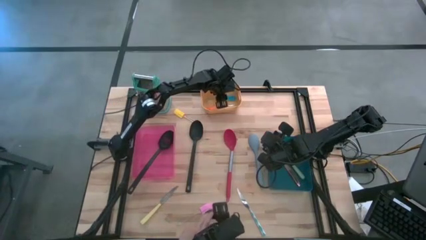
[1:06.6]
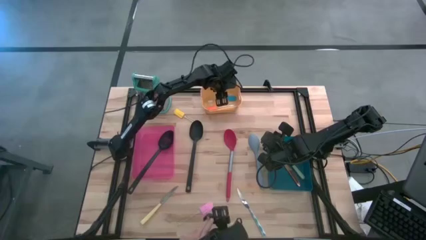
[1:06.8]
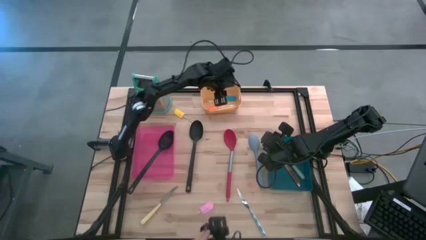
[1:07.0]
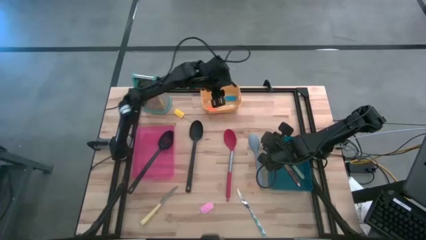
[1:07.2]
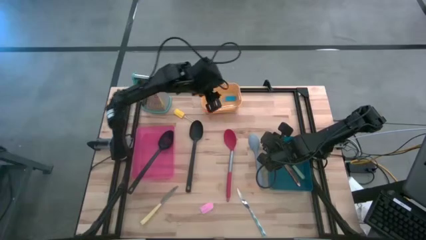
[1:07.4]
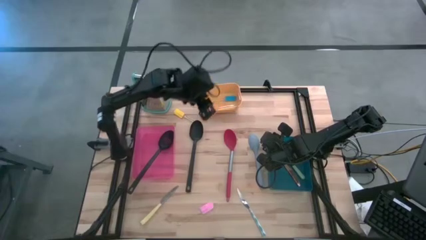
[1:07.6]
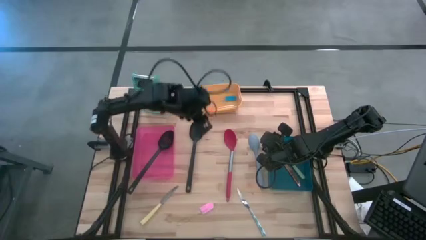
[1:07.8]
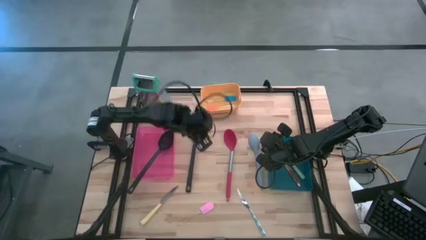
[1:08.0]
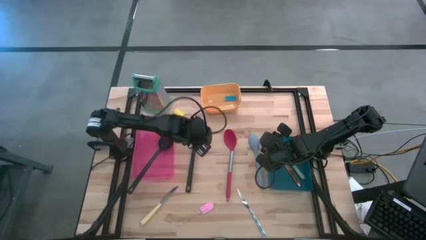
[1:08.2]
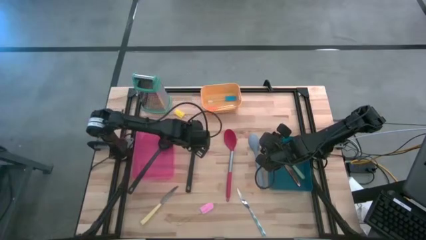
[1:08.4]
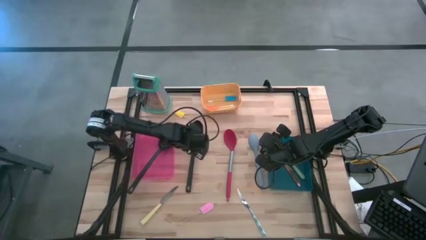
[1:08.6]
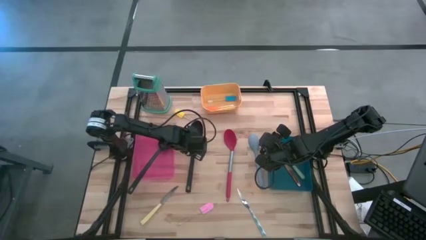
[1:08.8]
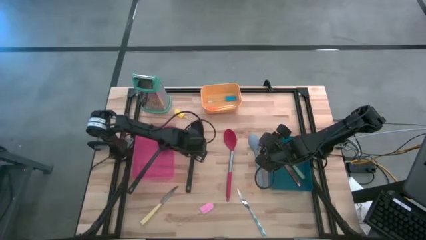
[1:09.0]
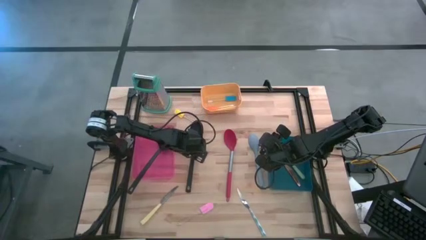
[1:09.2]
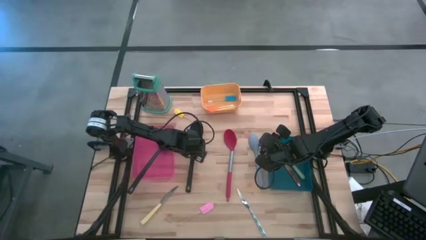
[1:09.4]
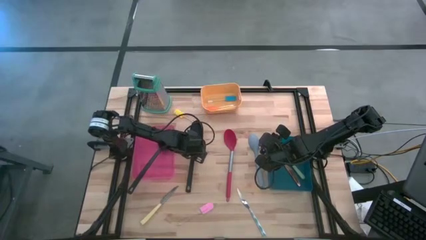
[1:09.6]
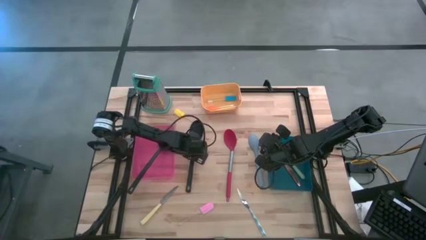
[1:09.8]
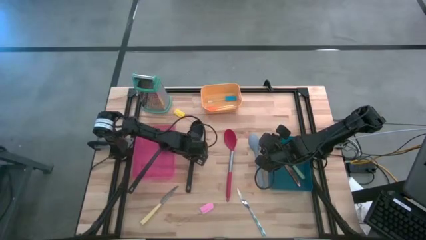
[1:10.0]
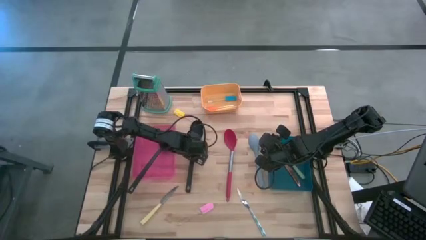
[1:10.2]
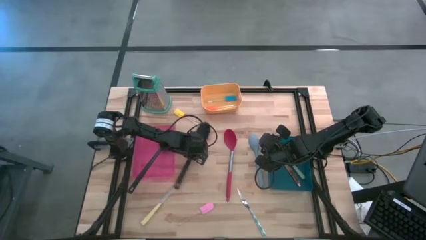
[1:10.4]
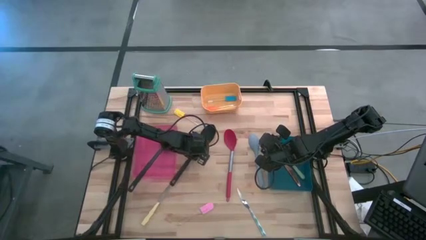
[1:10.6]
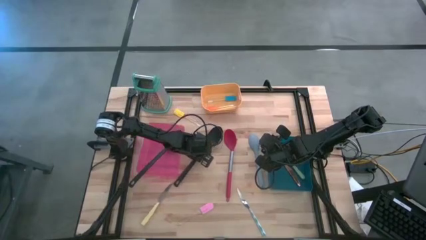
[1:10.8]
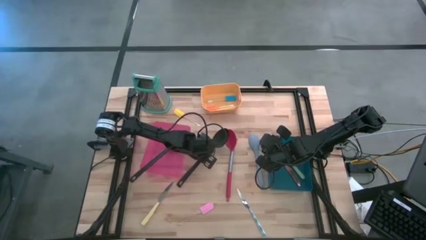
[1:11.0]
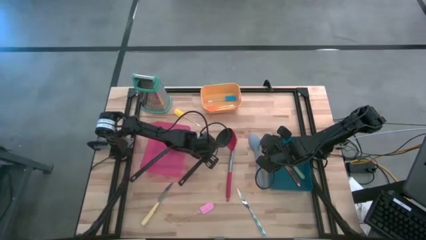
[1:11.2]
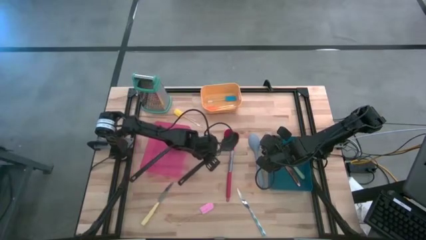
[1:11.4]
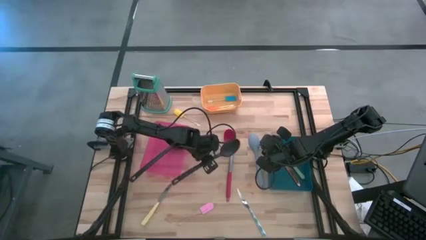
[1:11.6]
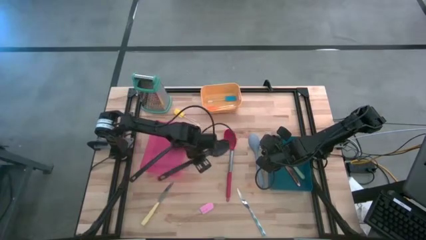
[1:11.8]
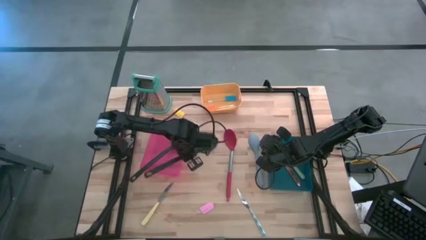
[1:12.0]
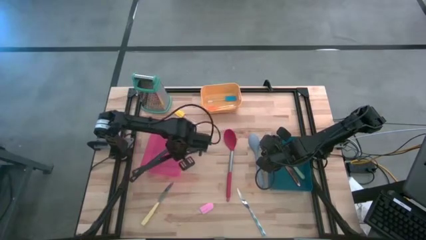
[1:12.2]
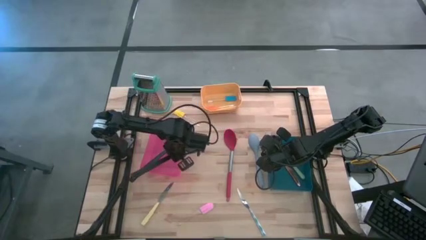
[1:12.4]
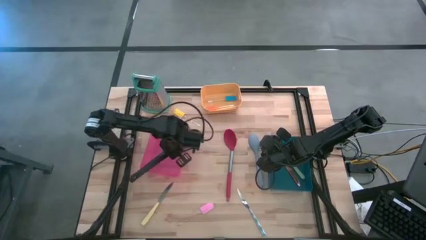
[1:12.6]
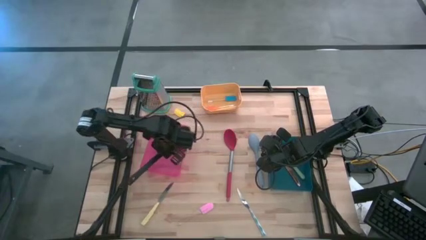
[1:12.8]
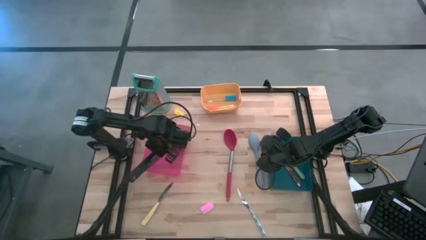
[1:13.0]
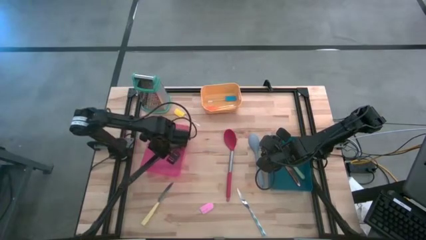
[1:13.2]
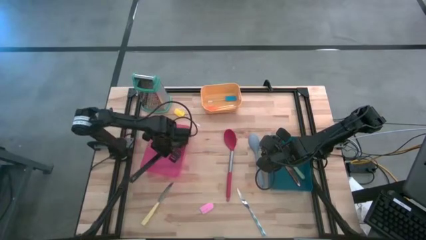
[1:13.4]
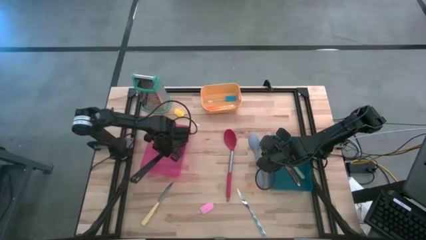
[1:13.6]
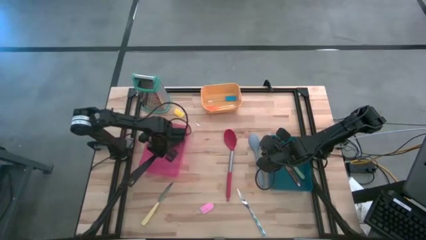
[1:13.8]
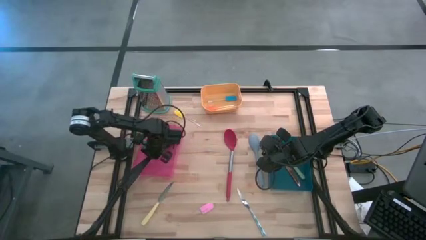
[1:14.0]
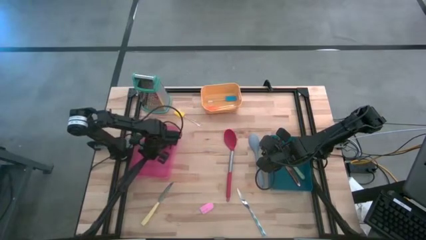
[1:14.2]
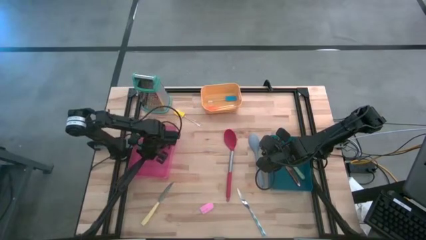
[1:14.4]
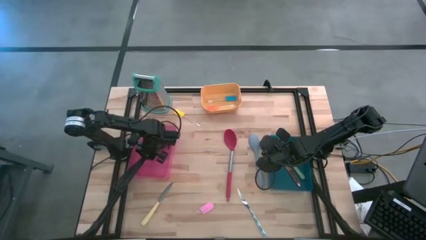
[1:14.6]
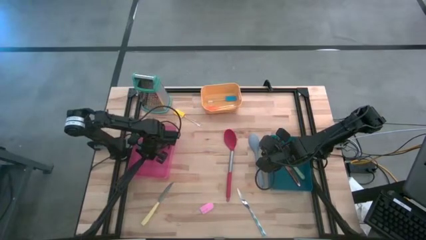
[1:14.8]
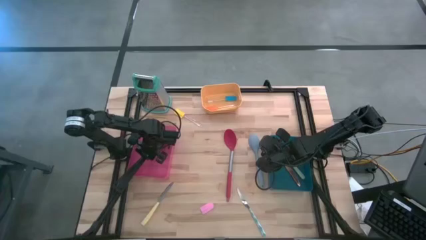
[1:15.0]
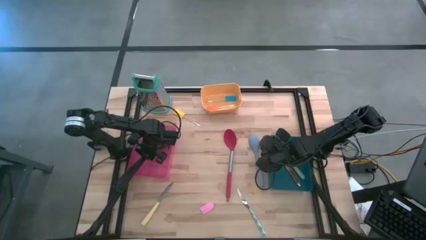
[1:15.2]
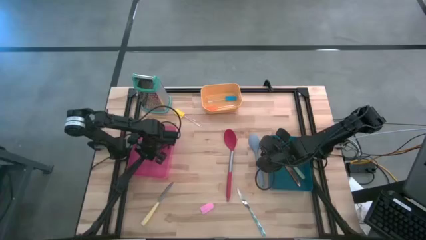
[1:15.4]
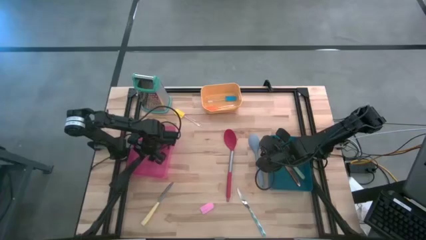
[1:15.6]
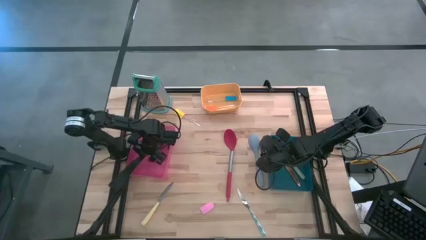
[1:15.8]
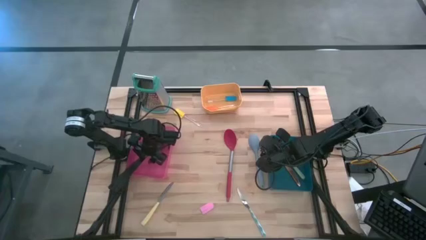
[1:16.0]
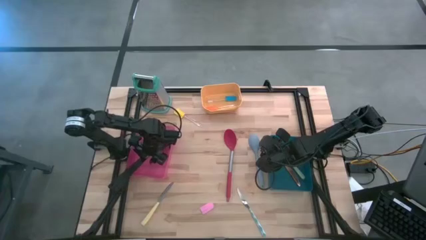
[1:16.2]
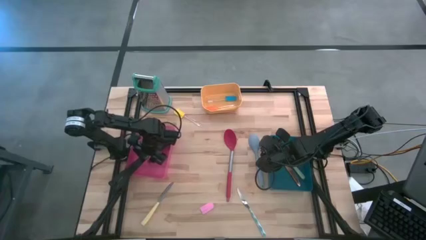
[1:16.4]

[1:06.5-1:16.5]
Task: Pick & Place Kitchen Items
Put the black serving spoon into the pink bin

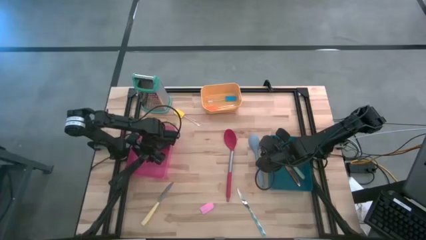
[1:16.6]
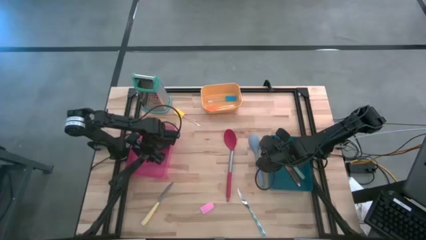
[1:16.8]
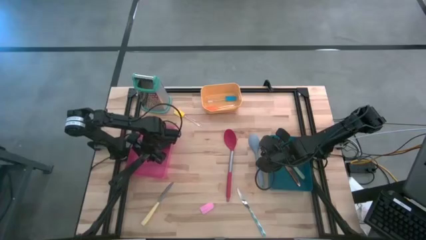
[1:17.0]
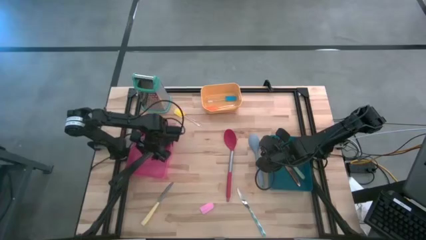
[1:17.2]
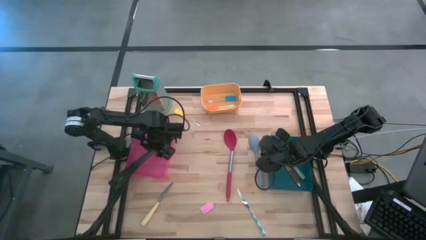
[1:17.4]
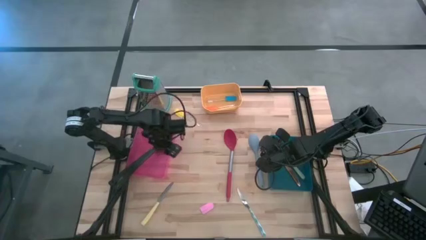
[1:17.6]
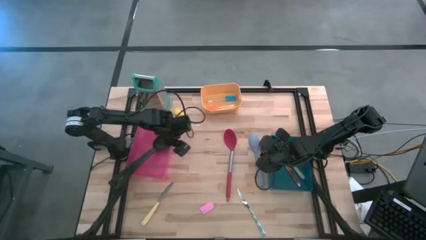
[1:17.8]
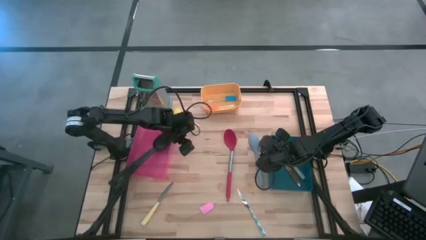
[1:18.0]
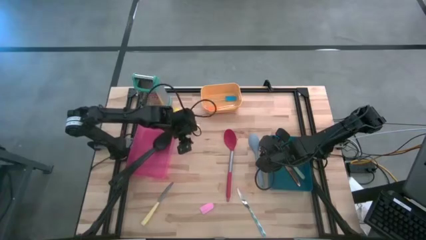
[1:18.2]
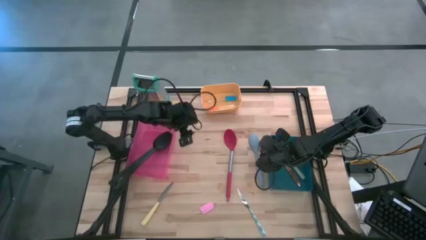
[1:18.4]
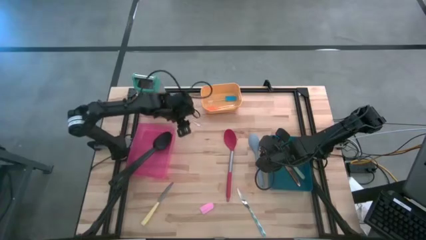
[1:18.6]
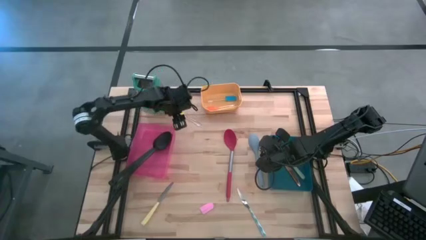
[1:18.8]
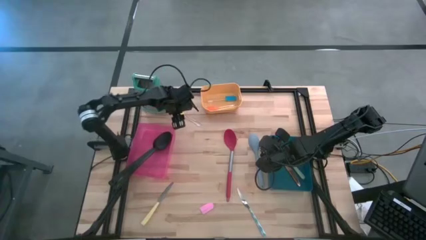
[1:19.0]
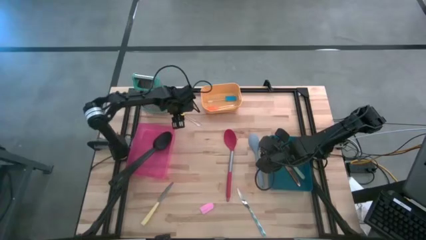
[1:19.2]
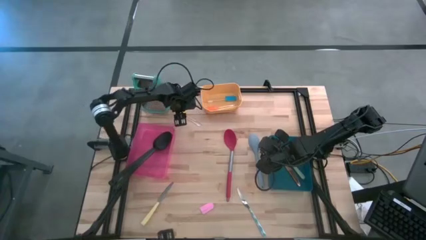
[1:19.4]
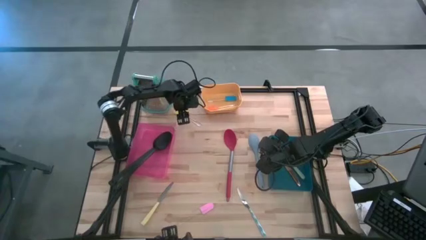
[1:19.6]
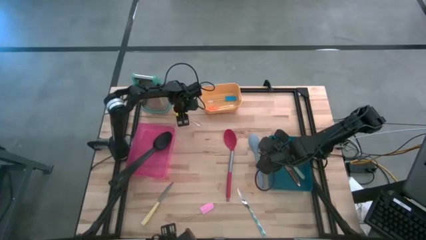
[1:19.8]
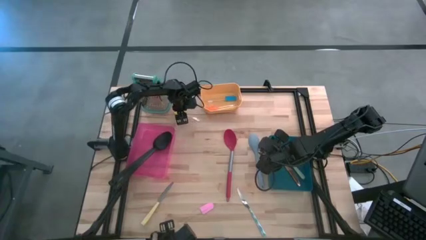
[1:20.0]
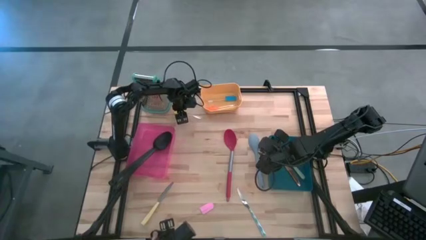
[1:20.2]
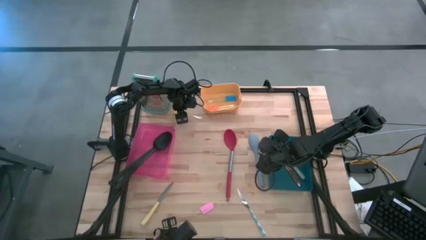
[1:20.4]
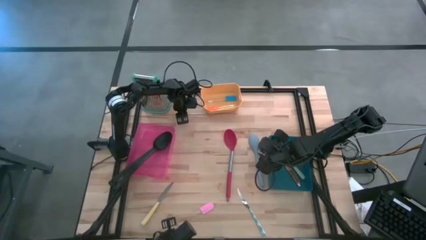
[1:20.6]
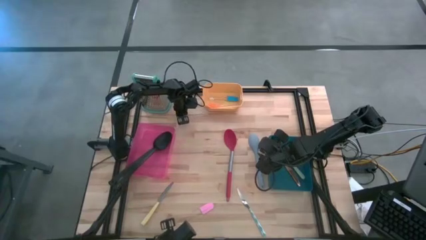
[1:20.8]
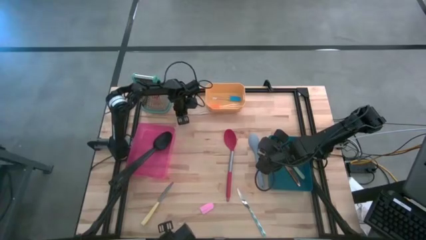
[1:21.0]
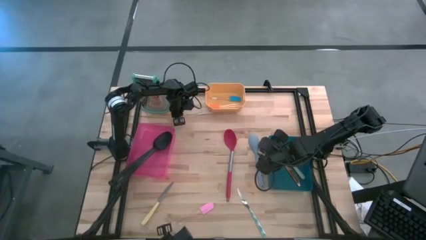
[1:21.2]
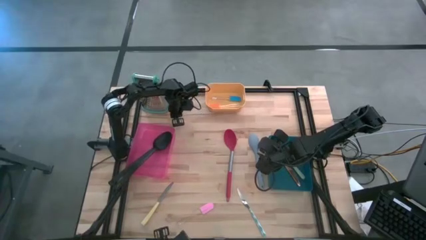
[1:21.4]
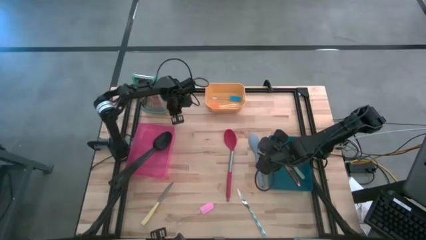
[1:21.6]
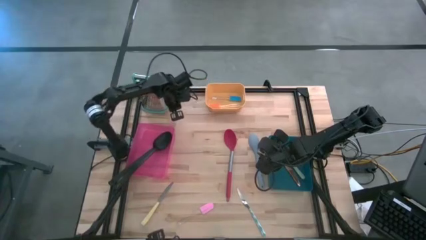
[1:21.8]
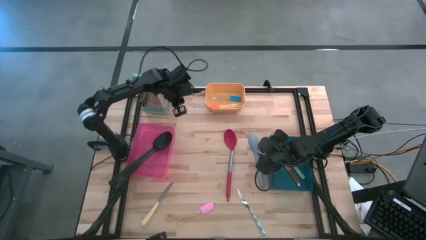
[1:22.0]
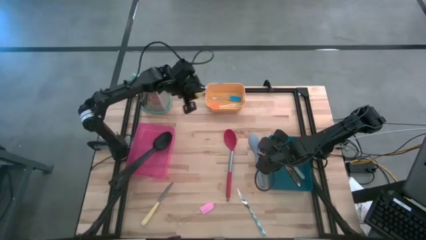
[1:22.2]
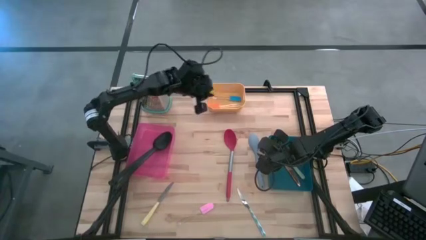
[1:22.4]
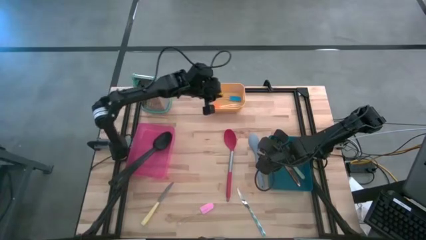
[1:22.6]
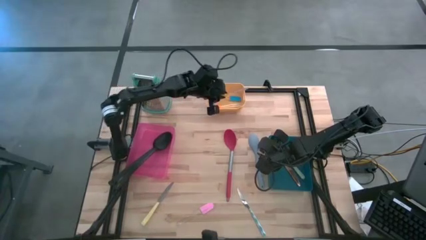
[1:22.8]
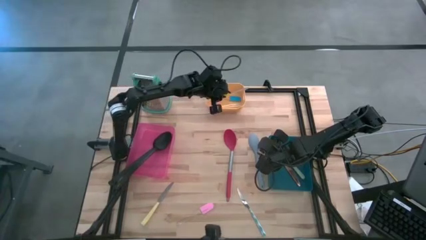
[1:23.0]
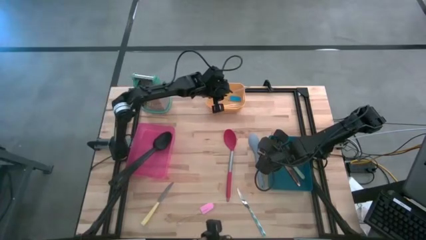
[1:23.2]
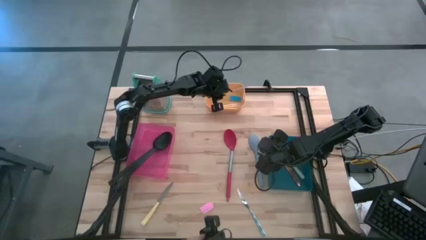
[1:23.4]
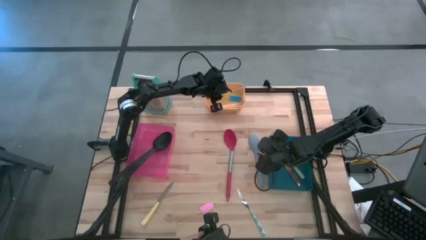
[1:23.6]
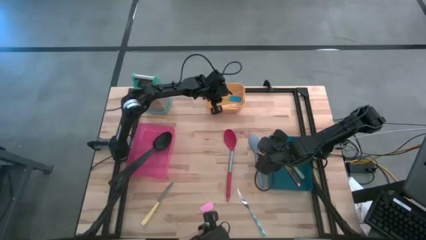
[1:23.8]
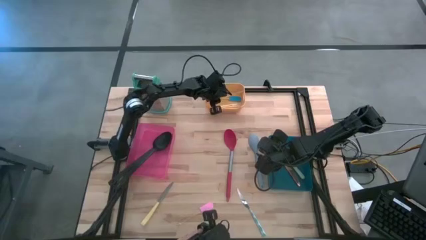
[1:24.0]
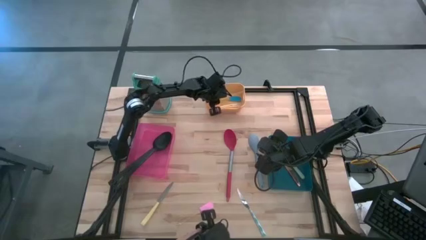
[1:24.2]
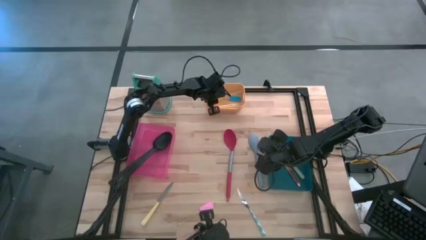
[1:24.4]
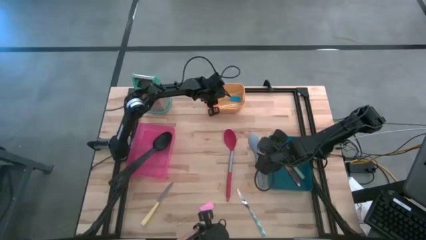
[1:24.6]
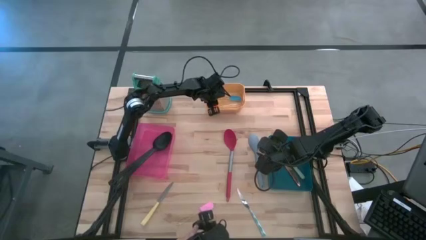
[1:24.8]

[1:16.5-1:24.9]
Put the yellow spatula into the yellow bin
